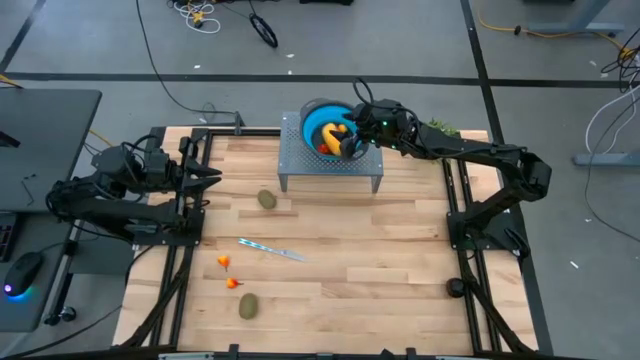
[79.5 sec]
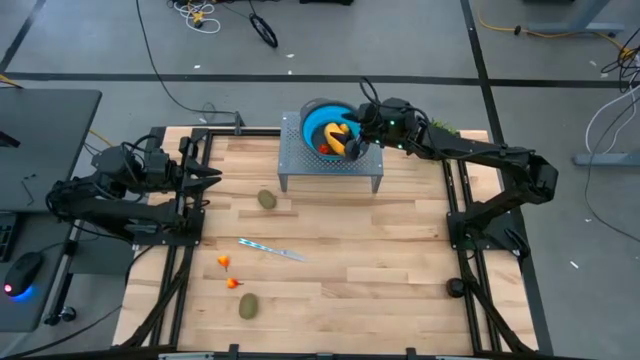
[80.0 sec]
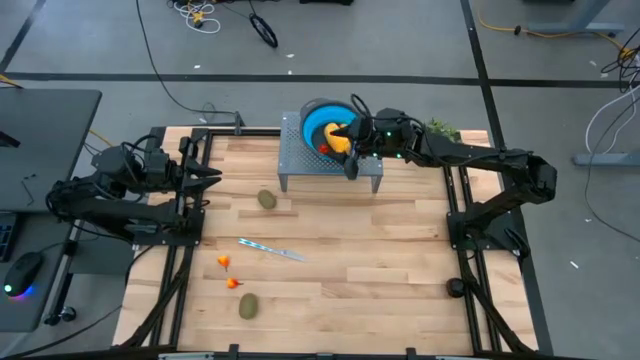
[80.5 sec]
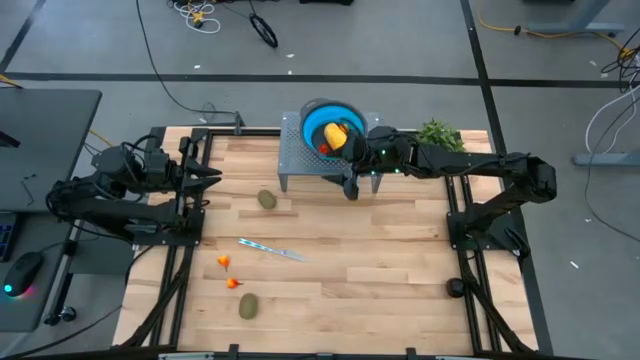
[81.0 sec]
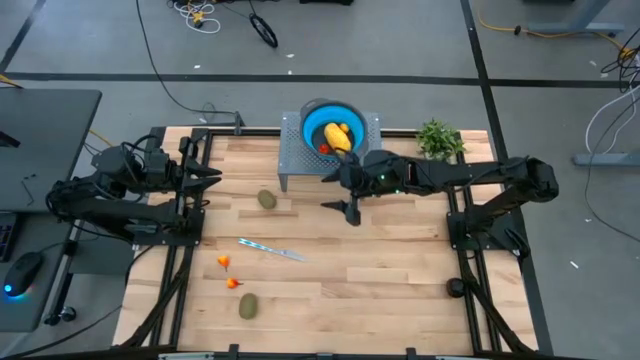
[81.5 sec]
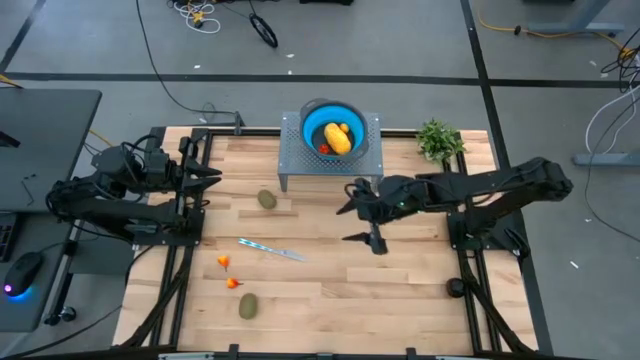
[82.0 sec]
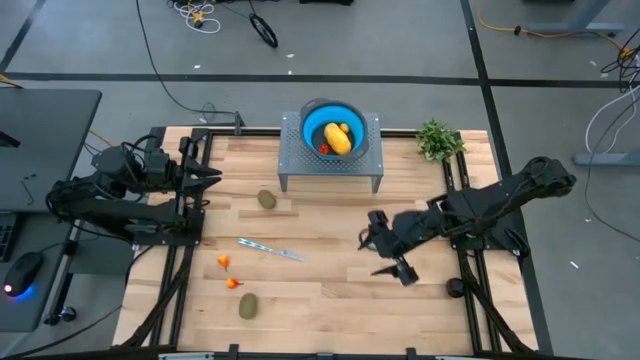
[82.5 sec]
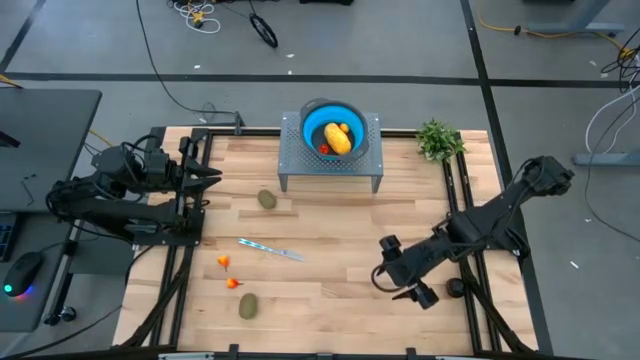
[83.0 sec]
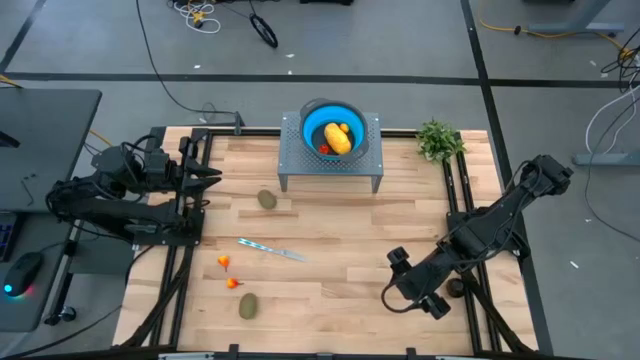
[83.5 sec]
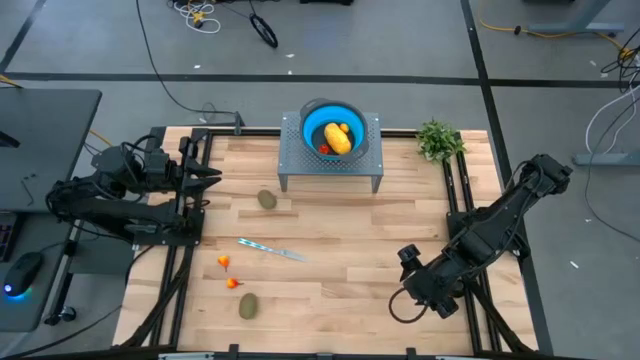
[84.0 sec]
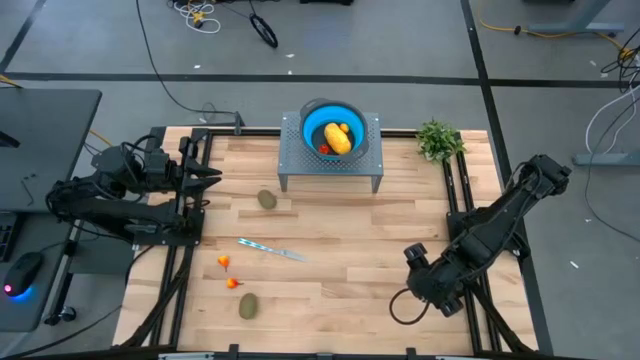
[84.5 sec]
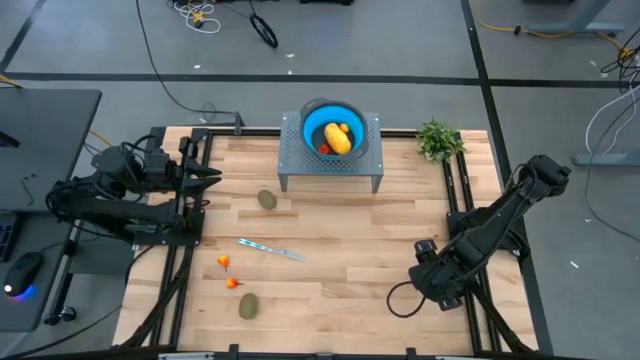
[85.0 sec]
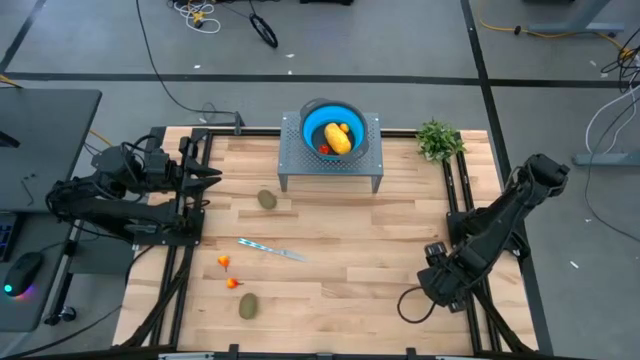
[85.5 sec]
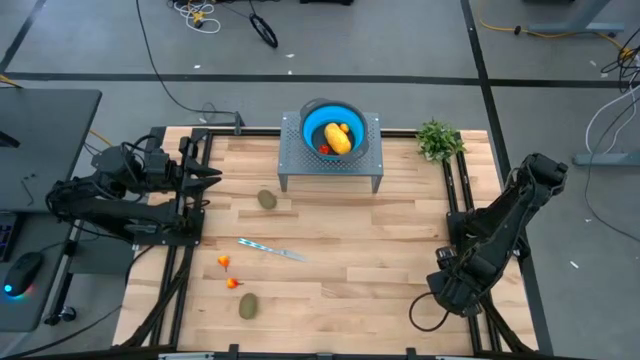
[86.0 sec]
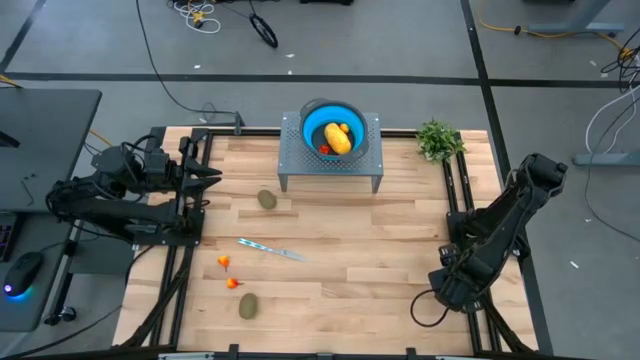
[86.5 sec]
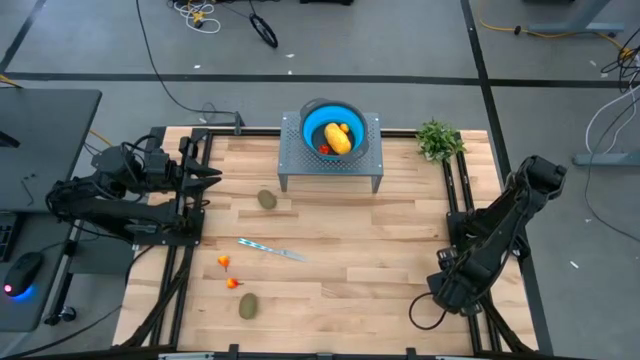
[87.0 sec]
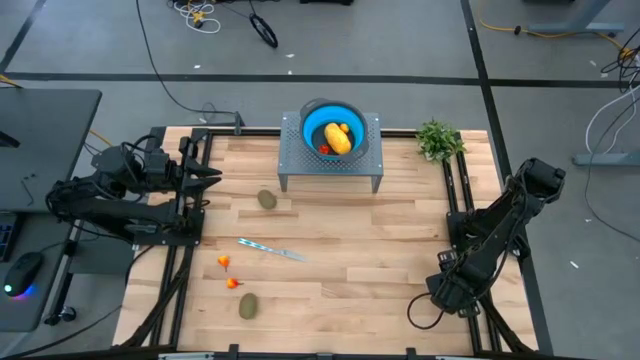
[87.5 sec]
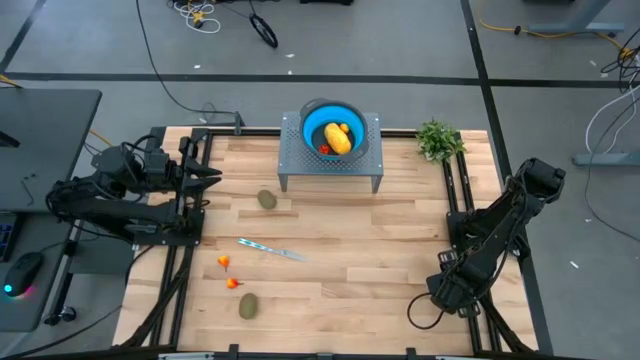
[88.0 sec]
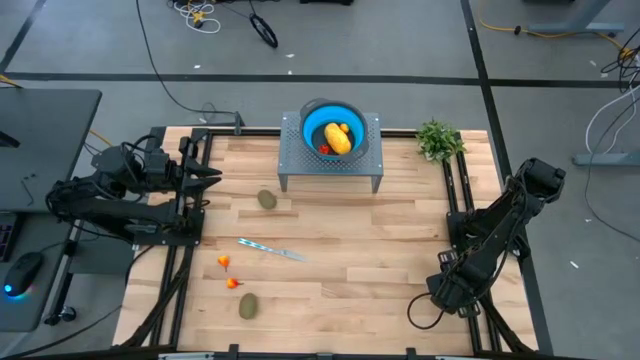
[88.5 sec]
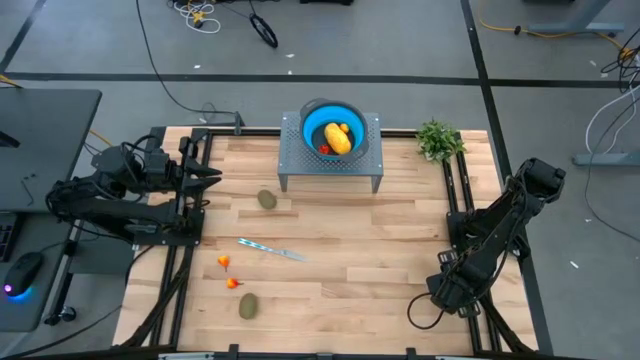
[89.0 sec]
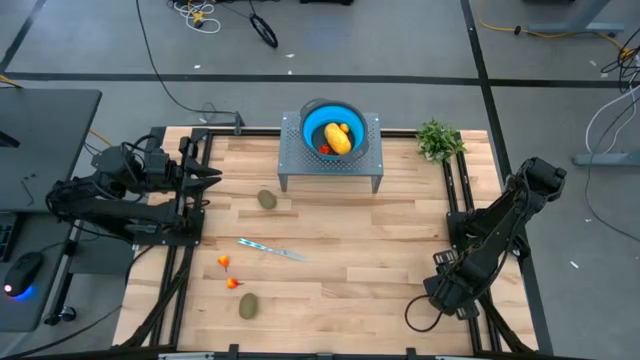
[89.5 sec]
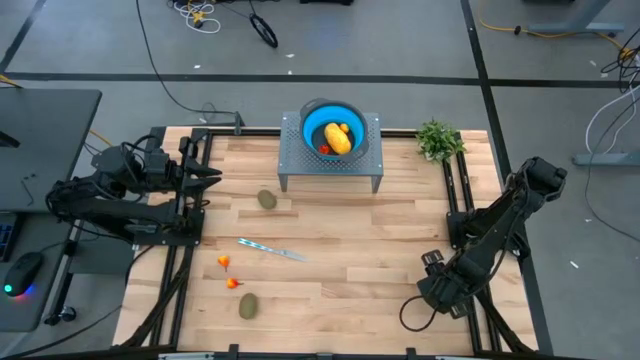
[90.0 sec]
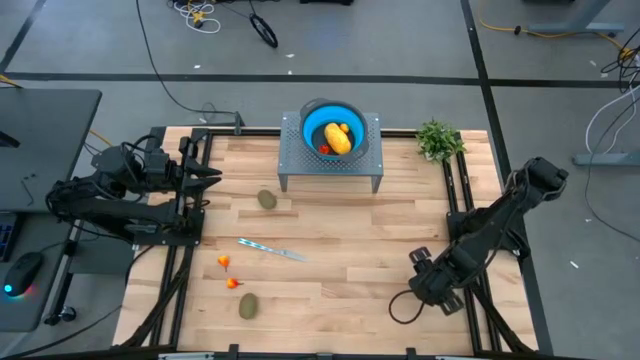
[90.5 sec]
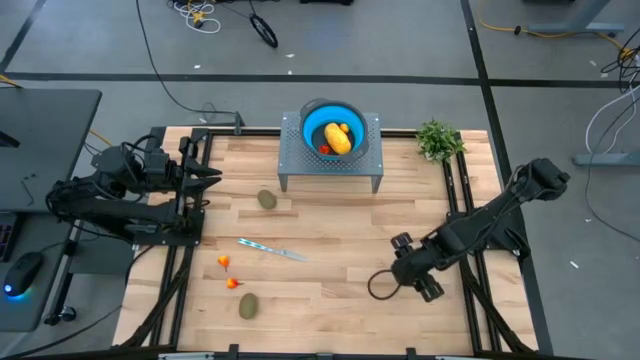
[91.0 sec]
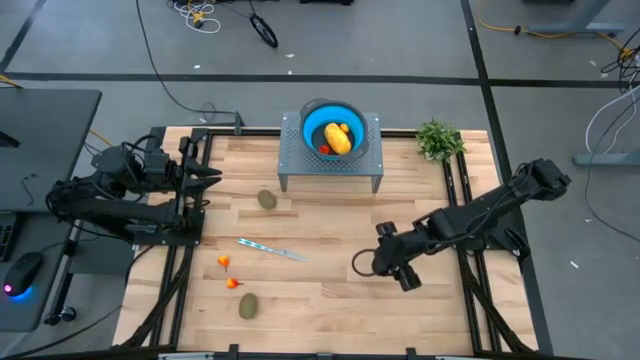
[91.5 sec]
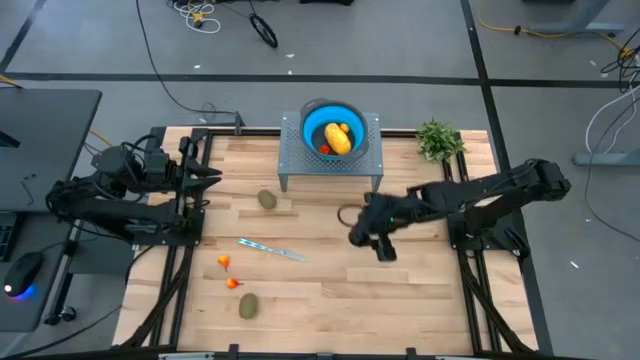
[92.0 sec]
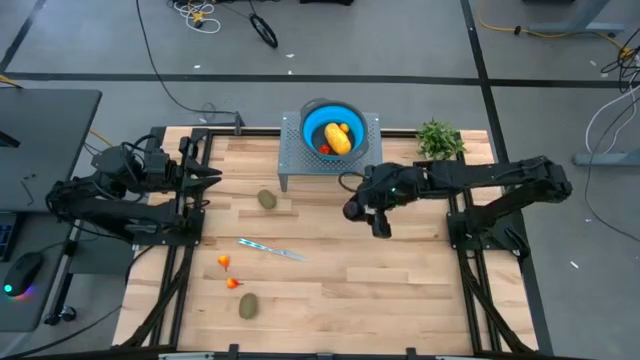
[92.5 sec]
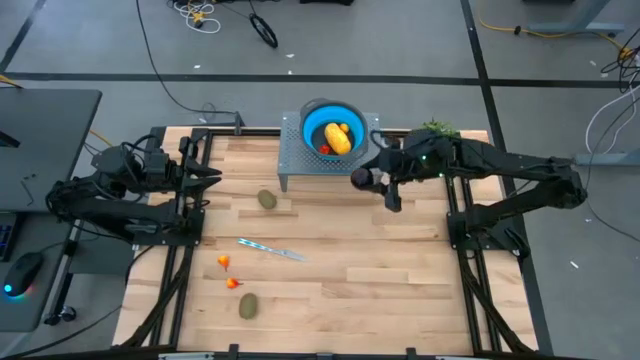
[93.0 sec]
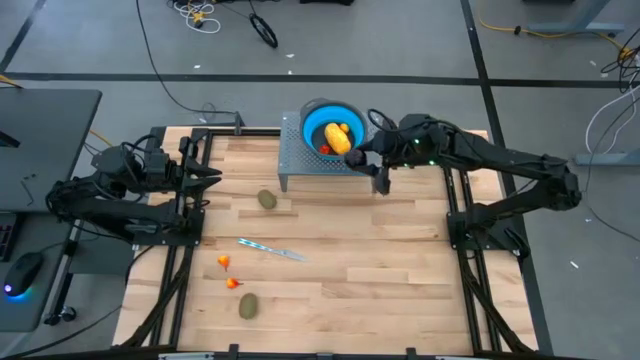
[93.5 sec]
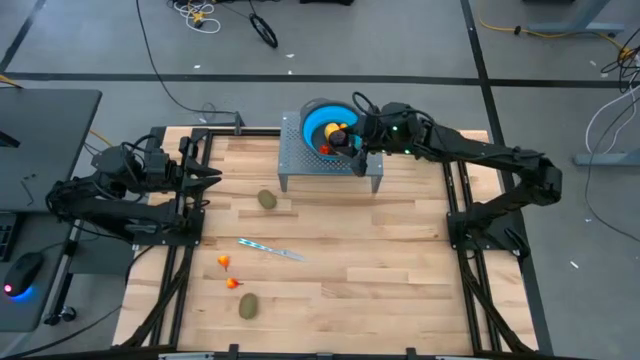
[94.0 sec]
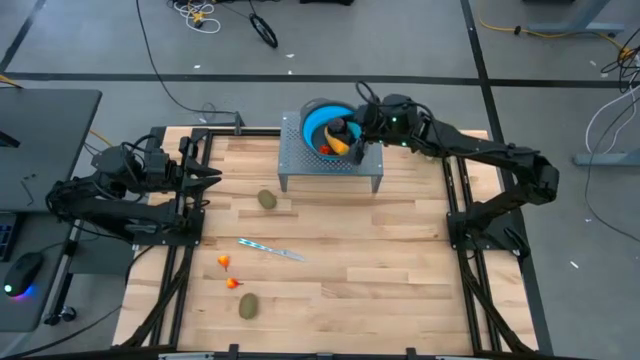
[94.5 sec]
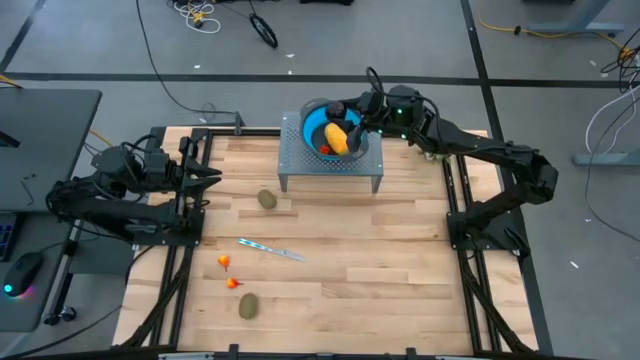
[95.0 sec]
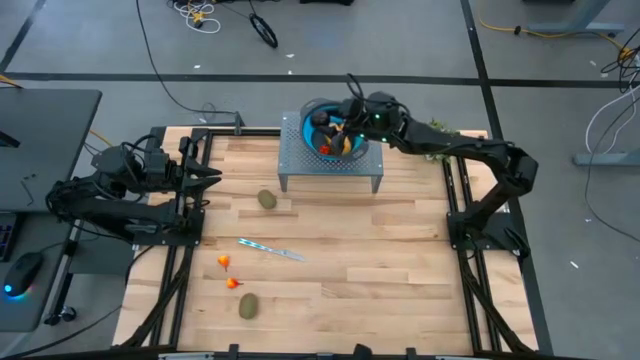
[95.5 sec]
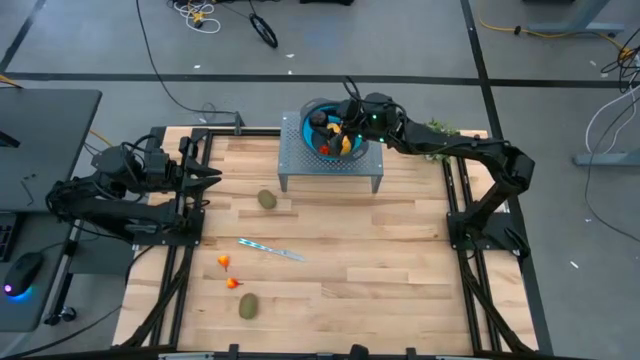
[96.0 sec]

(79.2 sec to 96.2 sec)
Task: Pick & Place Fruit
Put the plum into the blue bin
